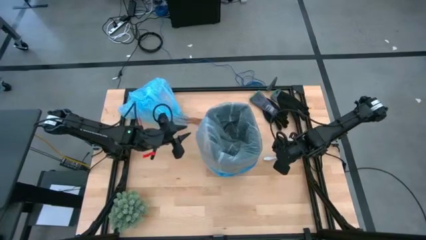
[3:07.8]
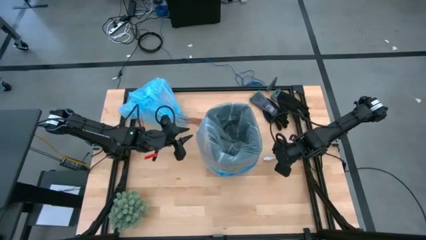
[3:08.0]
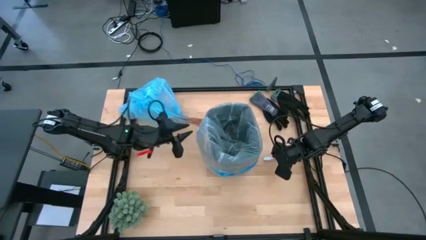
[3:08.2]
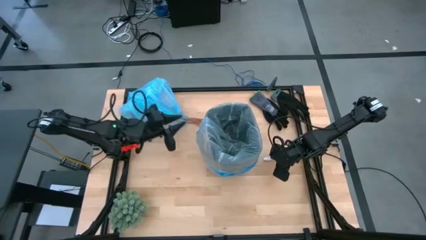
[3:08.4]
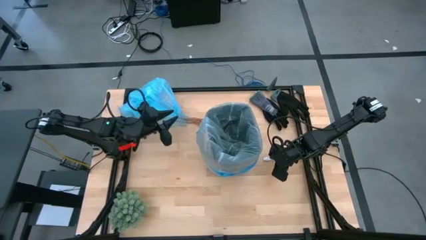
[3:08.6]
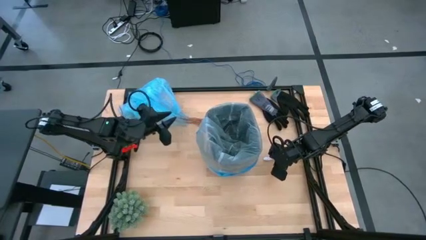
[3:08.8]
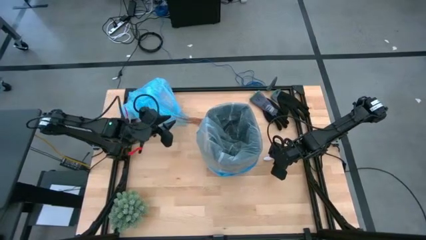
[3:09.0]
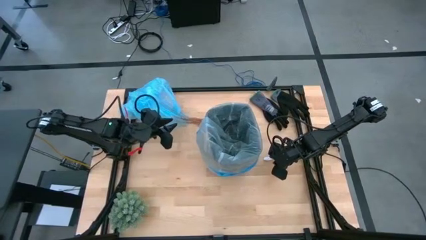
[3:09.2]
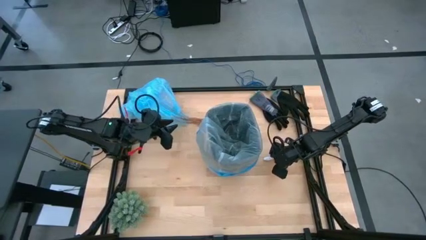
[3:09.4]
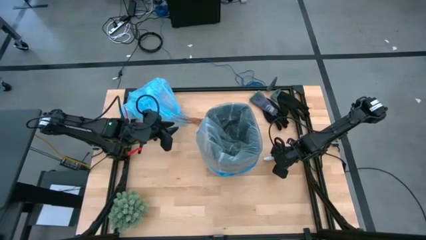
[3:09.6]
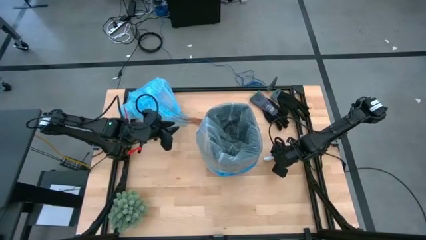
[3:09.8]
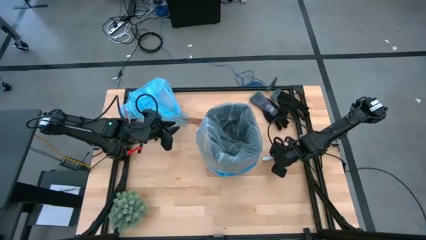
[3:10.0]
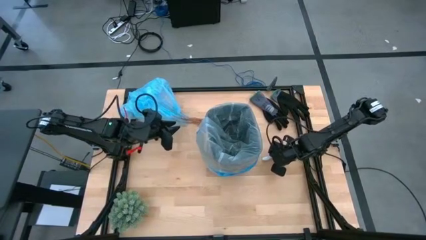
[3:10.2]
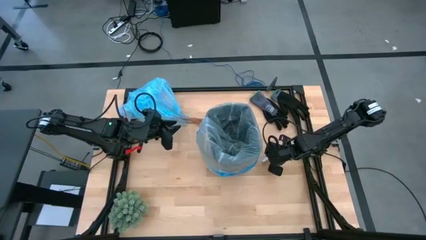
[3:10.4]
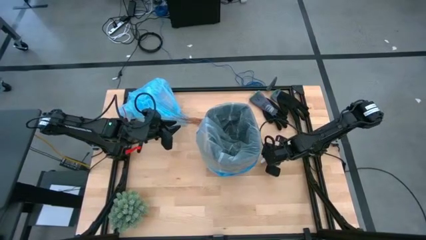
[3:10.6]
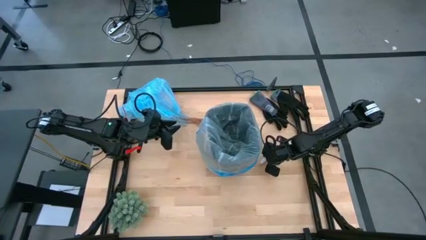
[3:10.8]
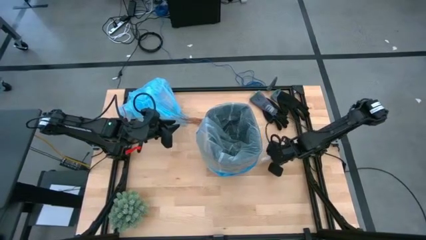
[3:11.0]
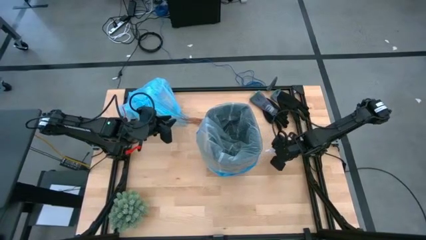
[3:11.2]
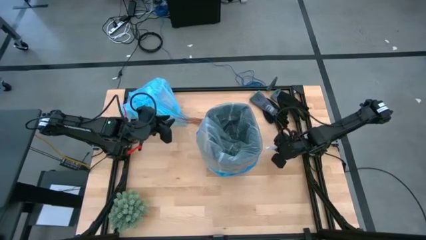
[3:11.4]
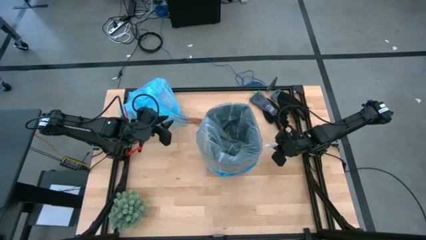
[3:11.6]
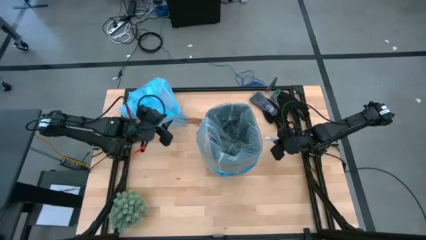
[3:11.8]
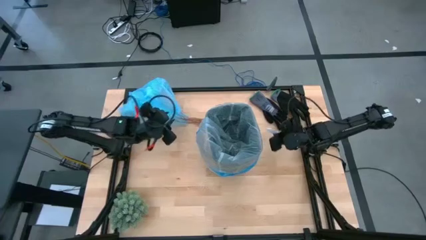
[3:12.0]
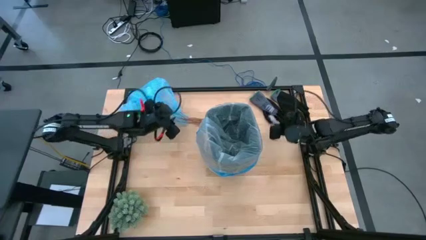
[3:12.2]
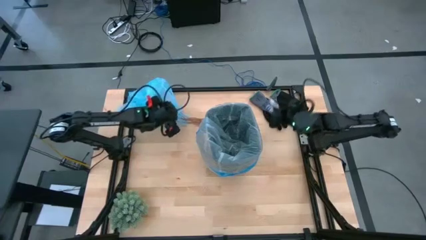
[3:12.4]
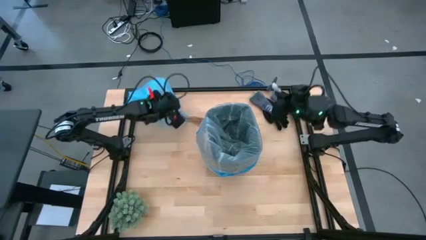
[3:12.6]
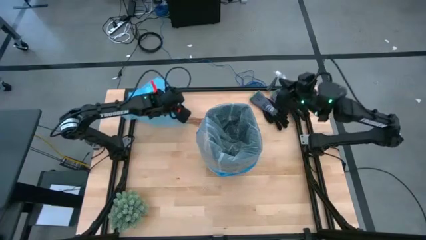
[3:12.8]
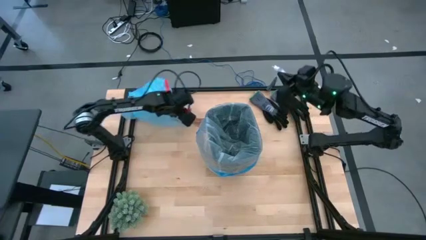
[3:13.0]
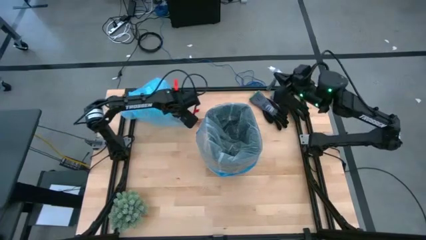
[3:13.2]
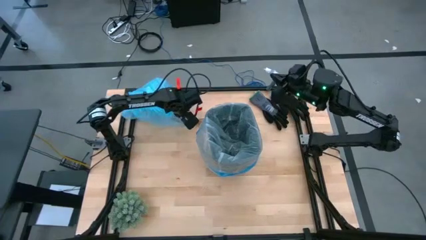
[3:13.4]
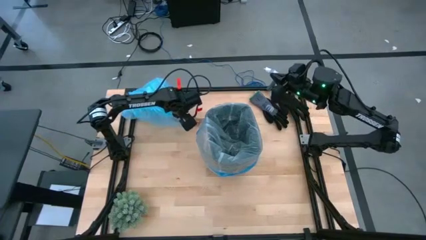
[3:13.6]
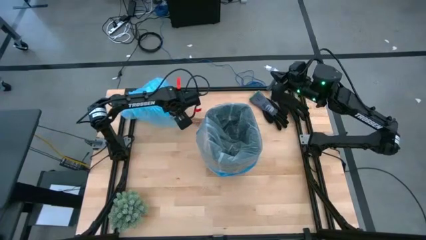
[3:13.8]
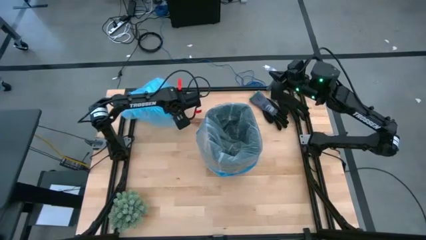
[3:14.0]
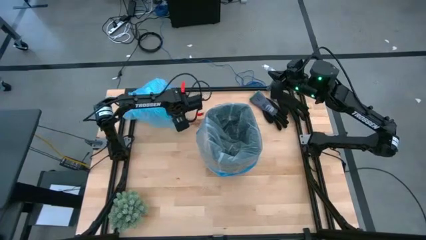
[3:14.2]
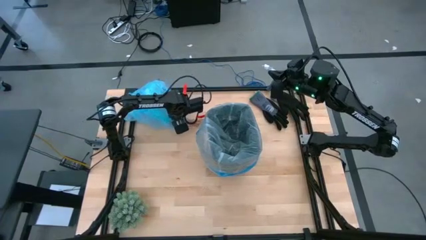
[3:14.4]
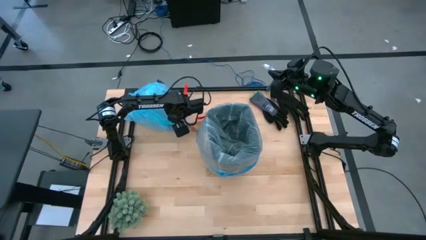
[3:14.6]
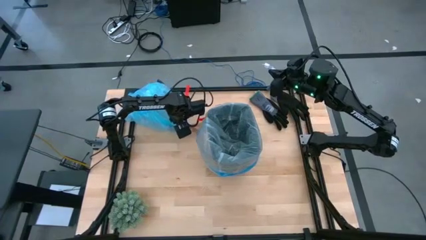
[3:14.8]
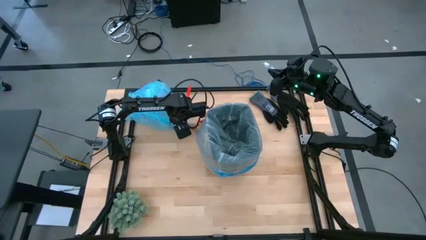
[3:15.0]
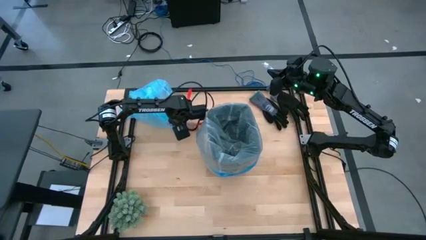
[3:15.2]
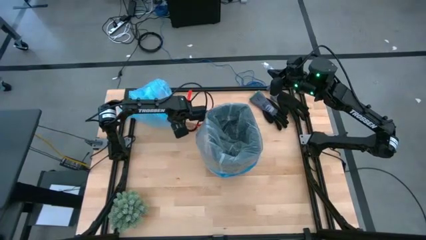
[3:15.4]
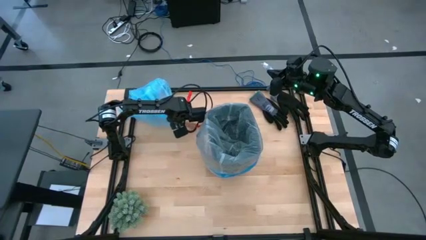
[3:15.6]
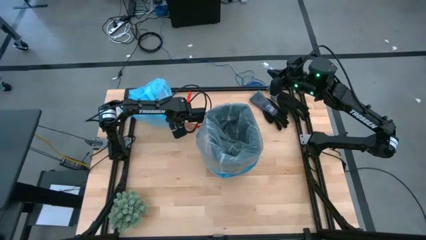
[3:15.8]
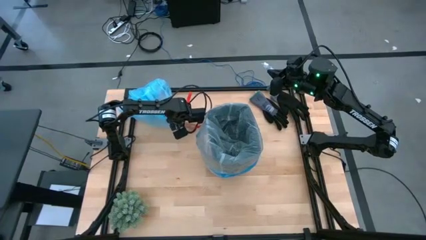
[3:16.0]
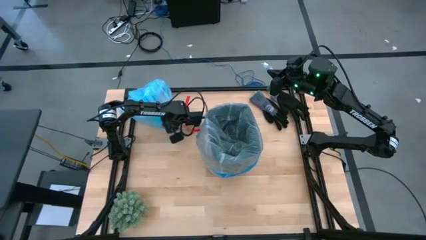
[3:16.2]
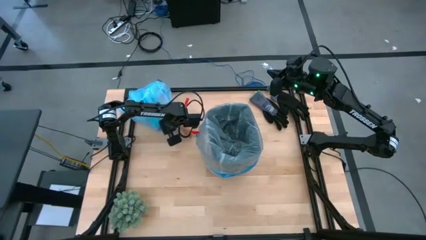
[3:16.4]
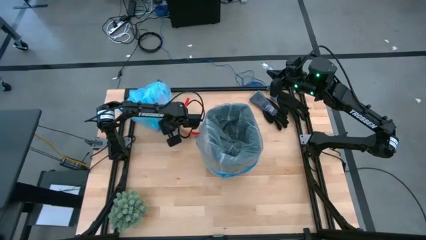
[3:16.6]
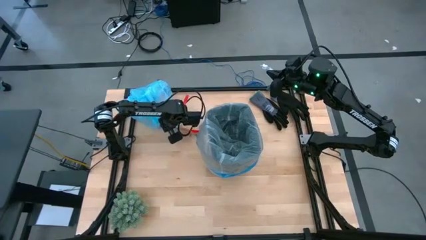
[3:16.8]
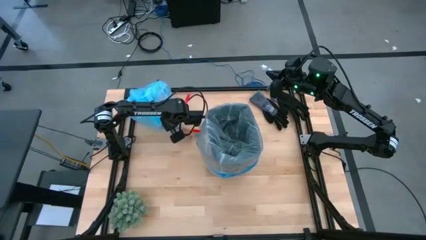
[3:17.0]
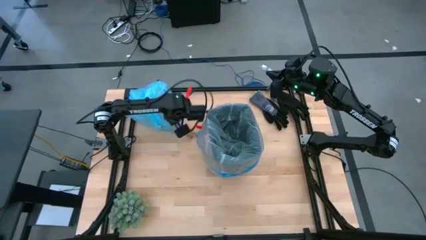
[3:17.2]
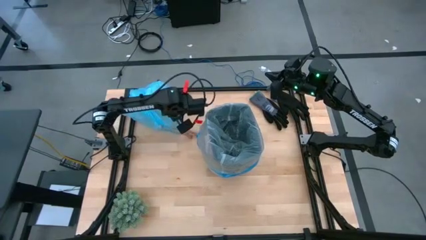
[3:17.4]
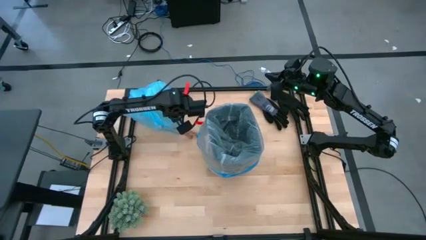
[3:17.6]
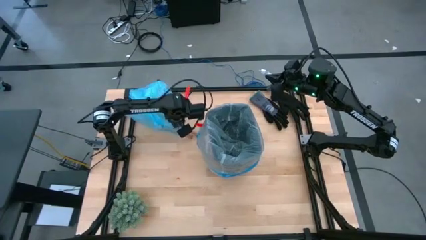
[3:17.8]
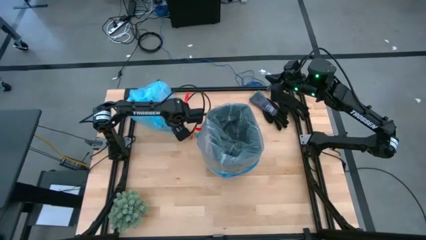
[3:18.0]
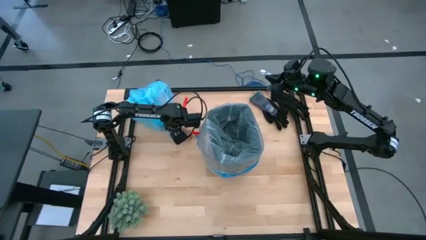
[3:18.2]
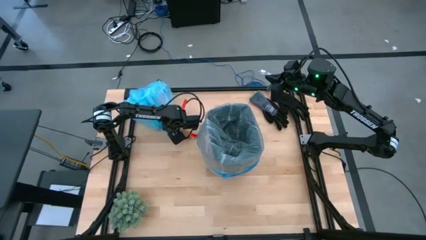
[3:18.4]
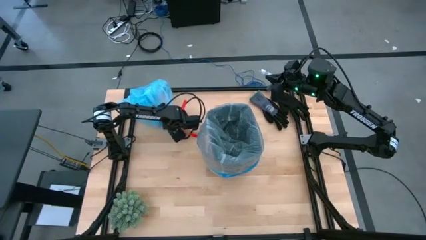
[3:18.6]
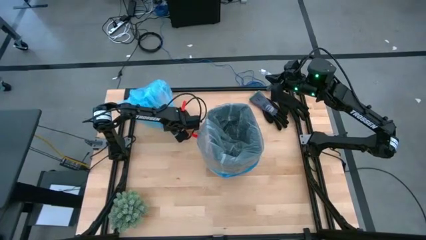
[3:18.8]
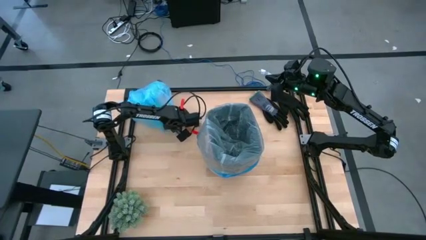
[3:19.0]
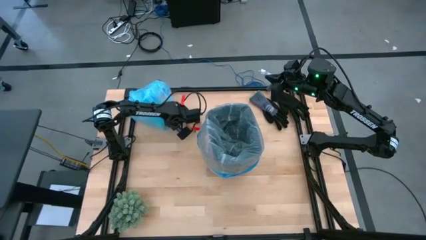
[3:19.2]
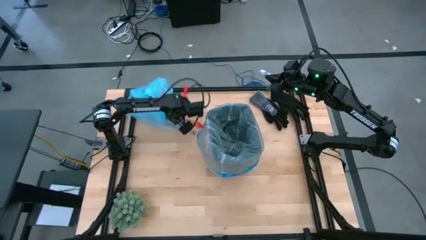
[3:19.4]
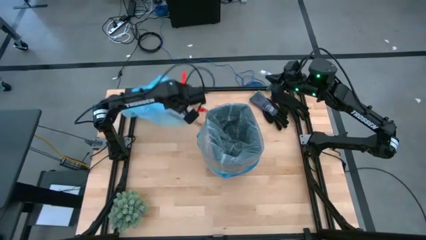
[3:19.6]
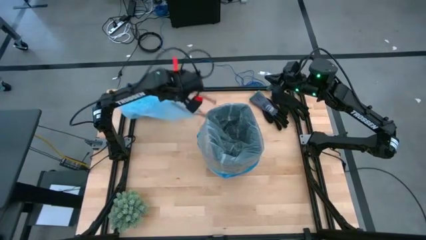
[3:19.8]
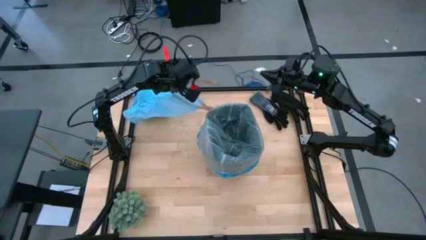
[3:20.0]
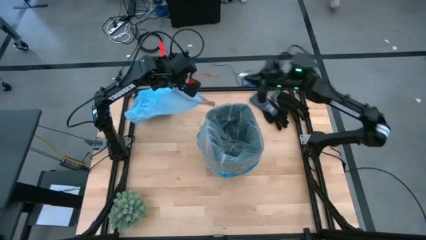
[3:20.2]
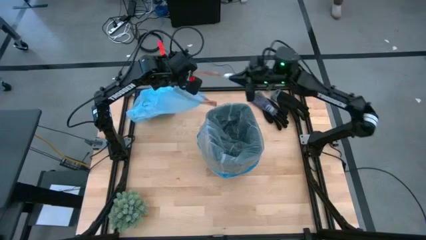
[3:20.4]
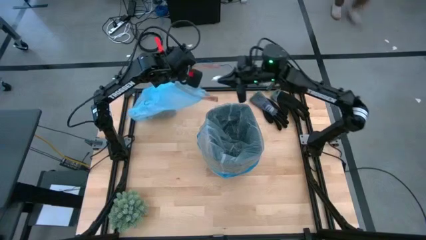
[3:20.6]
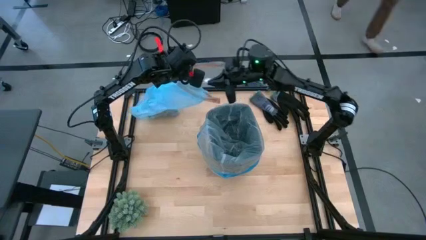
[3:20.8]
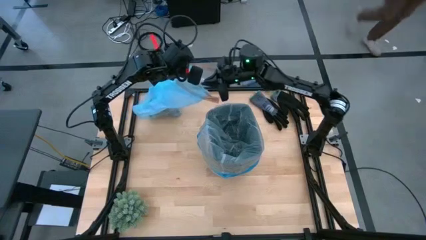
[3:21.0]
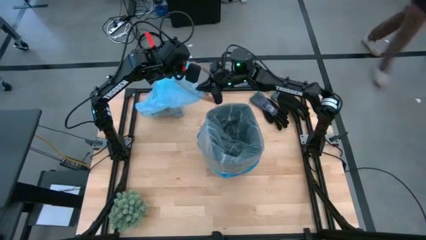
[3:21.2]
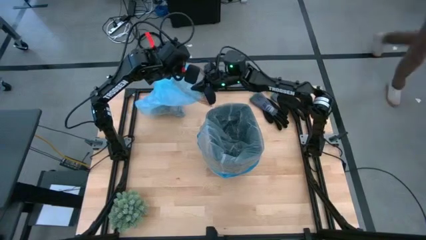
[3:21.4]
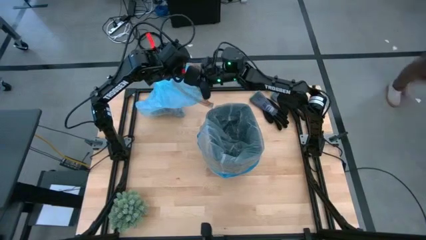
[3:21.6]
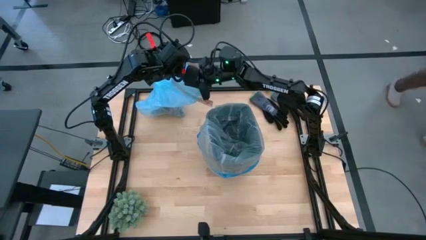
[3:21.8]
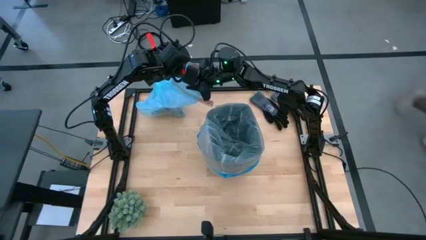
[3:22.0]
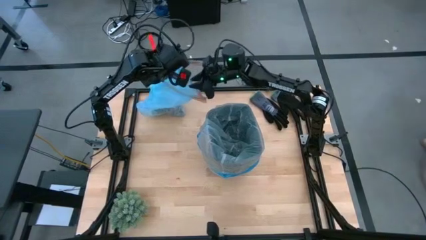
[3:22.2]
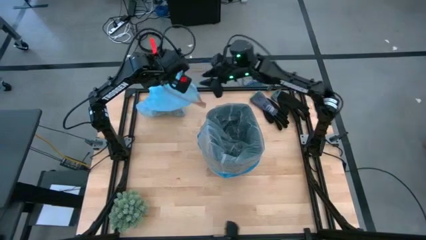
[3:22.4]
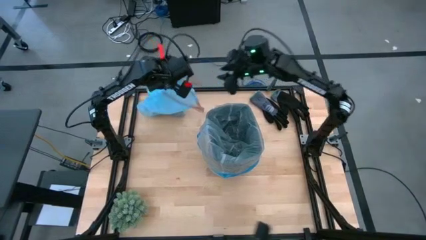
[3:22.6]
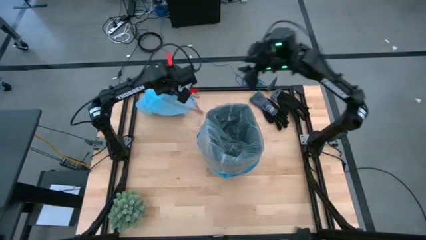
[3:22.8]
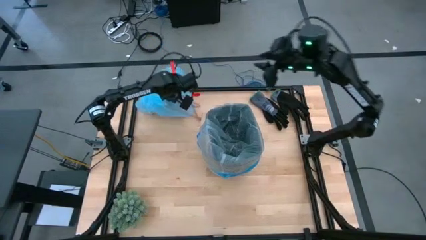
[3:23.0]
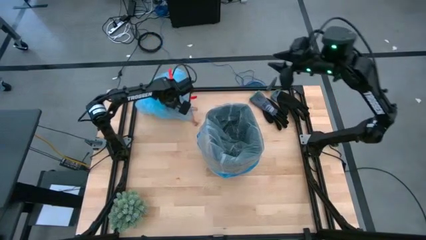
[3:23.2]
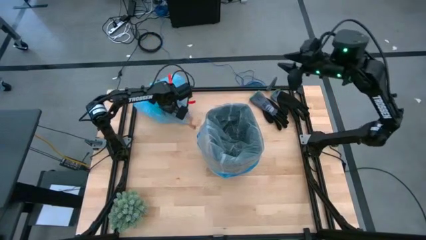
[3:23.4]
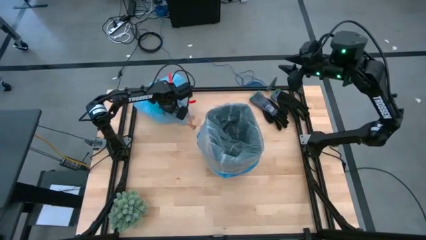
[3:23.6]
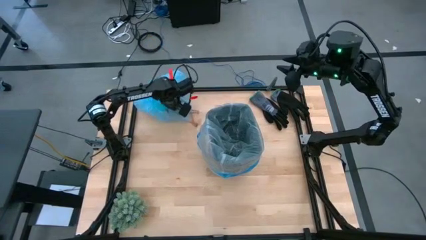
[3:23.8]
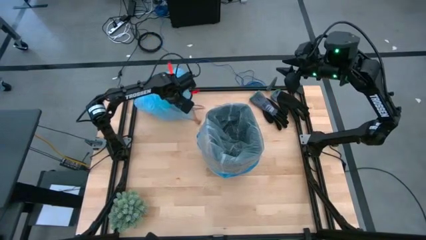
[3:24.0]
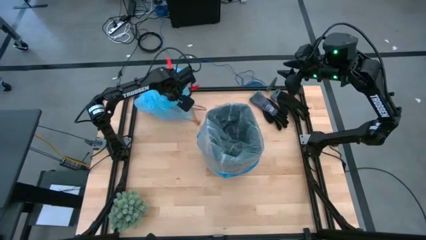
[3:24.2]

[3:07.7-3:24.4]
Task: place trash/remove bag and relplace
Put the white paper into the trash bag filled with trash
